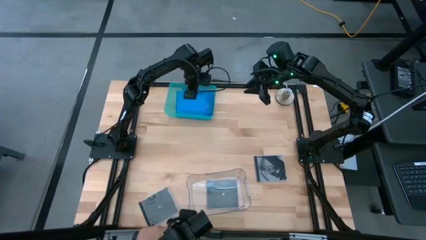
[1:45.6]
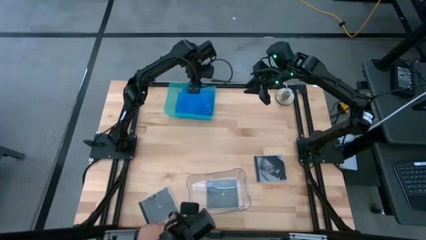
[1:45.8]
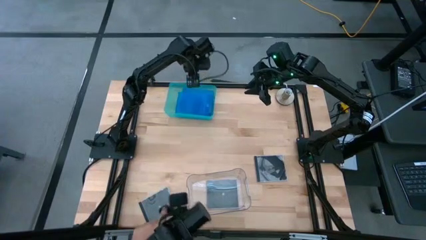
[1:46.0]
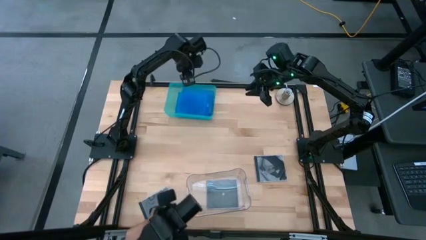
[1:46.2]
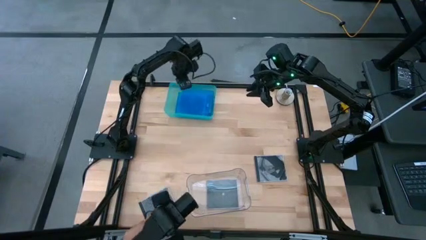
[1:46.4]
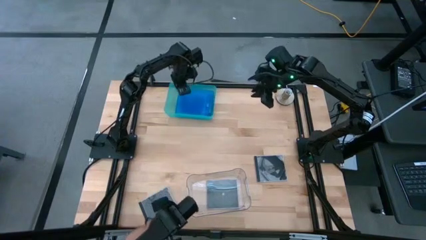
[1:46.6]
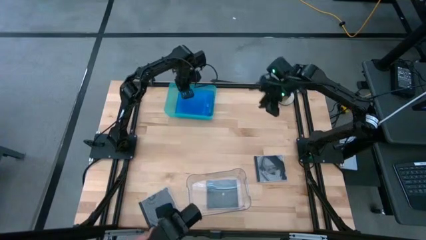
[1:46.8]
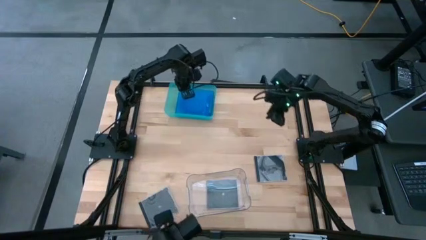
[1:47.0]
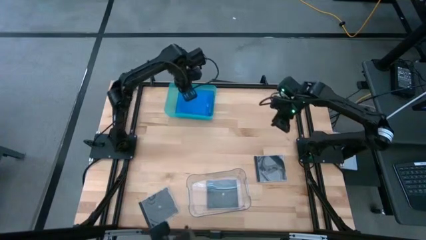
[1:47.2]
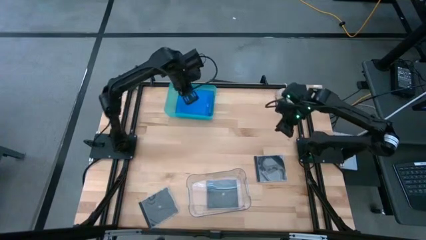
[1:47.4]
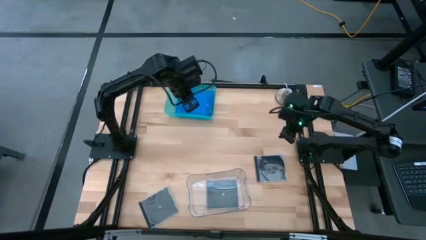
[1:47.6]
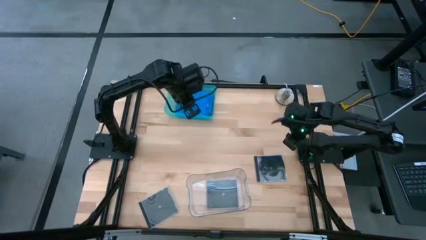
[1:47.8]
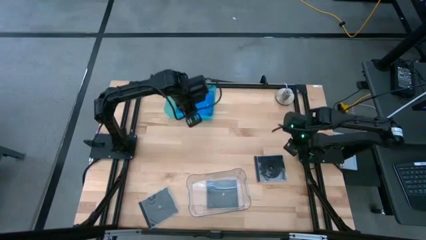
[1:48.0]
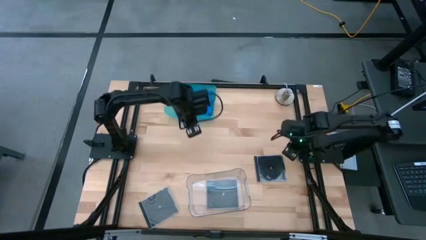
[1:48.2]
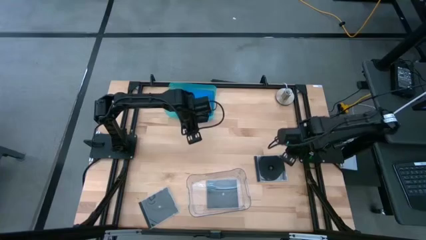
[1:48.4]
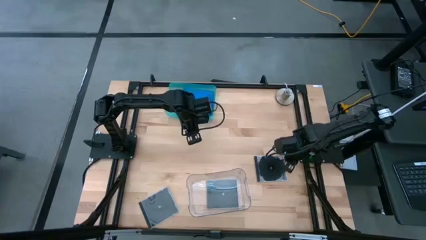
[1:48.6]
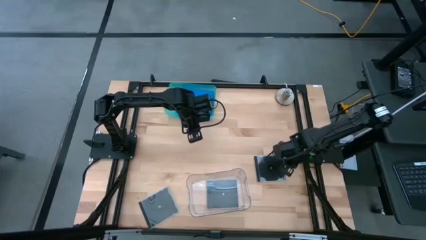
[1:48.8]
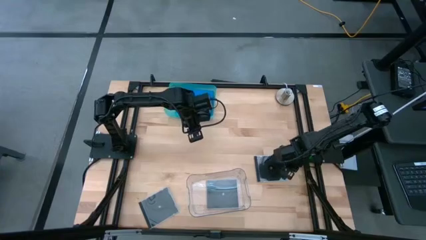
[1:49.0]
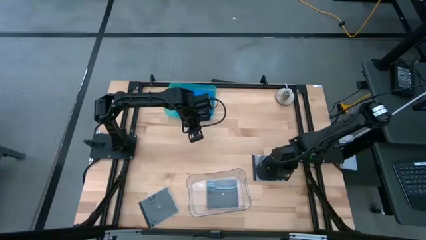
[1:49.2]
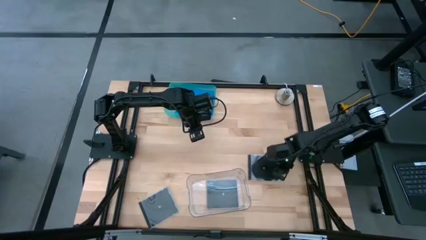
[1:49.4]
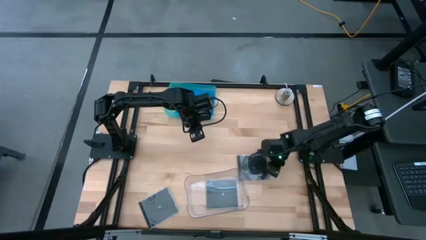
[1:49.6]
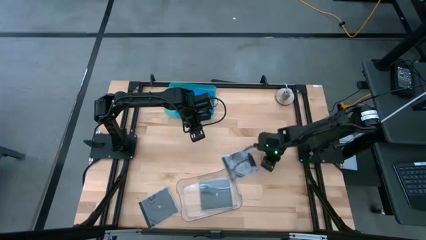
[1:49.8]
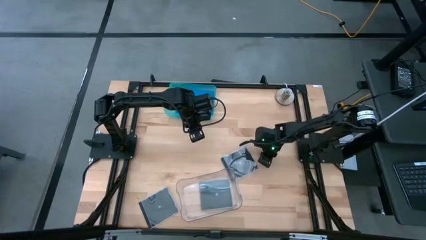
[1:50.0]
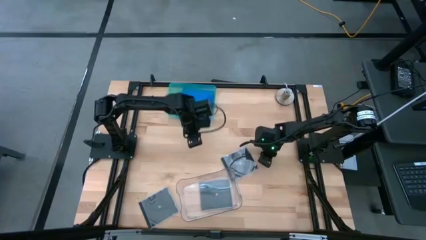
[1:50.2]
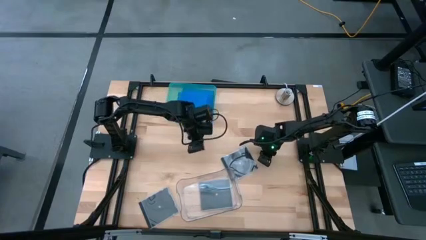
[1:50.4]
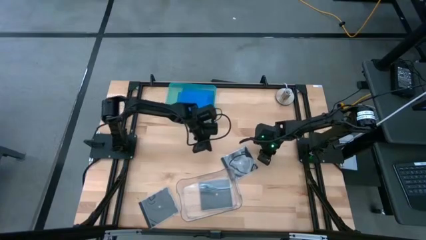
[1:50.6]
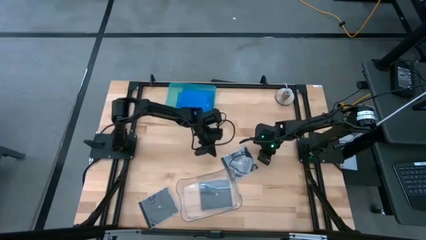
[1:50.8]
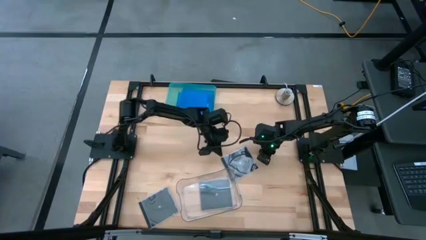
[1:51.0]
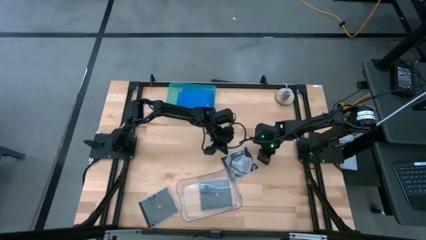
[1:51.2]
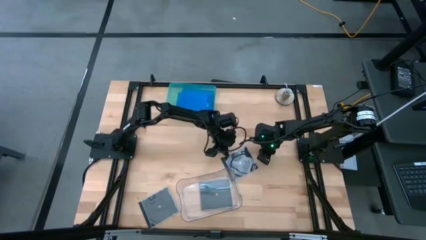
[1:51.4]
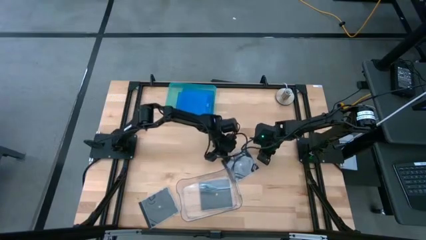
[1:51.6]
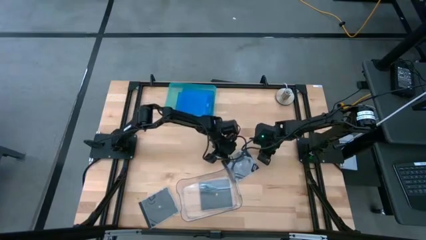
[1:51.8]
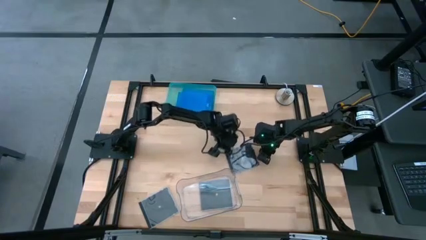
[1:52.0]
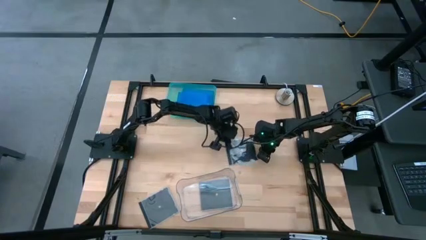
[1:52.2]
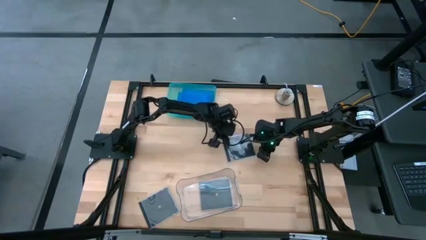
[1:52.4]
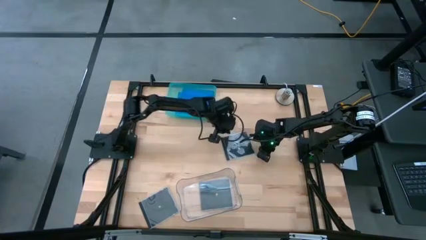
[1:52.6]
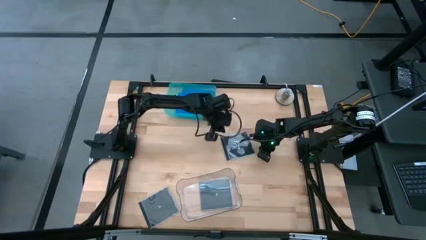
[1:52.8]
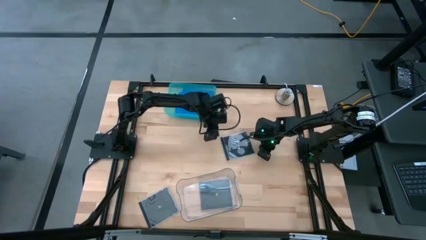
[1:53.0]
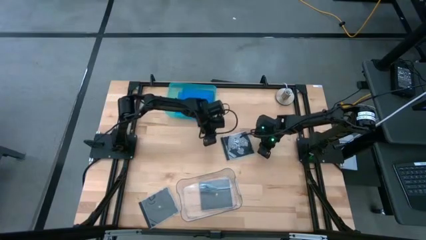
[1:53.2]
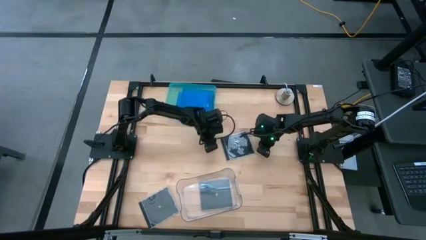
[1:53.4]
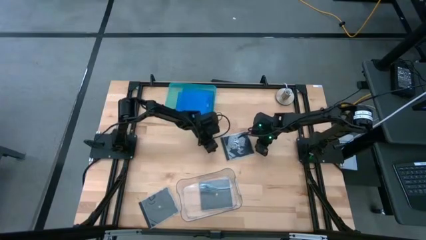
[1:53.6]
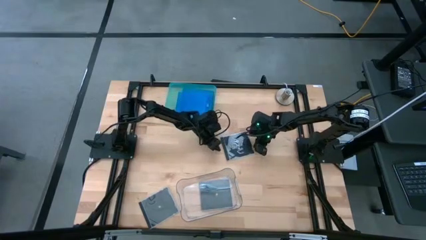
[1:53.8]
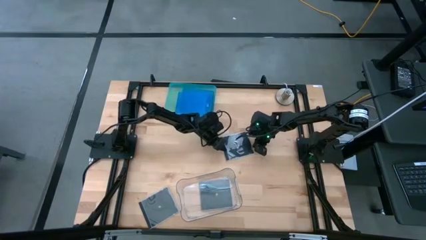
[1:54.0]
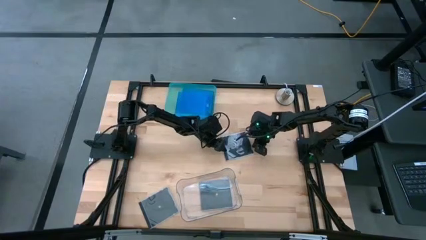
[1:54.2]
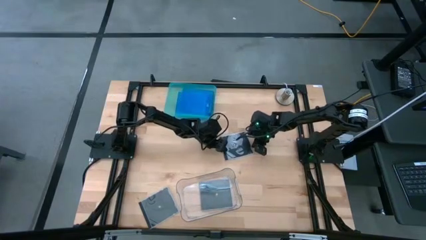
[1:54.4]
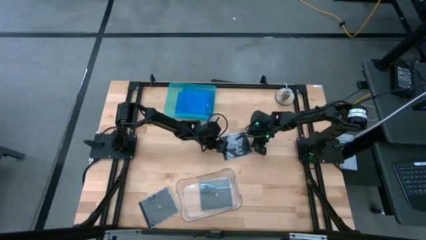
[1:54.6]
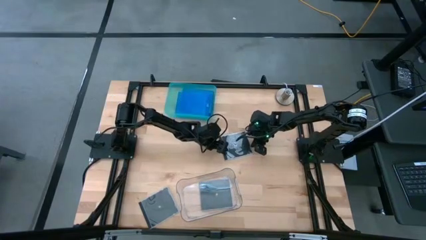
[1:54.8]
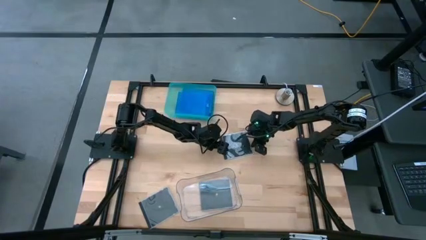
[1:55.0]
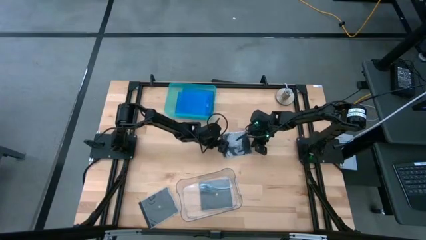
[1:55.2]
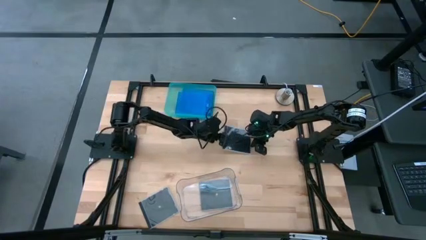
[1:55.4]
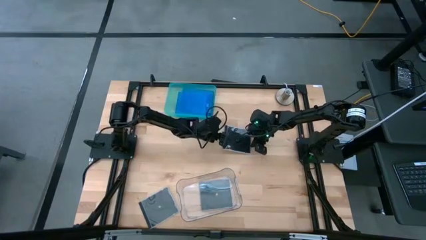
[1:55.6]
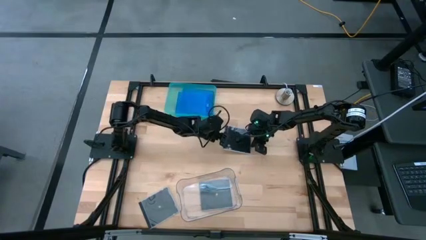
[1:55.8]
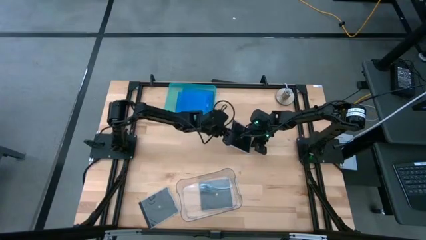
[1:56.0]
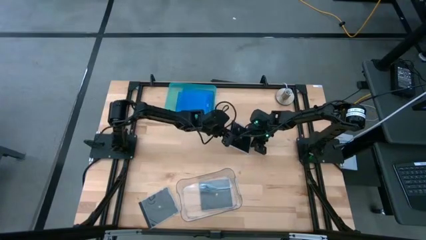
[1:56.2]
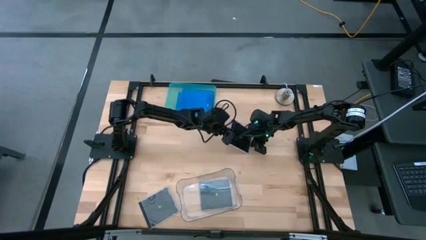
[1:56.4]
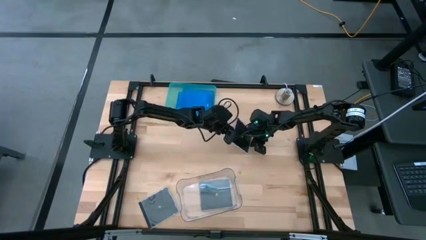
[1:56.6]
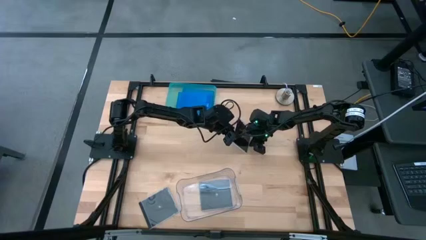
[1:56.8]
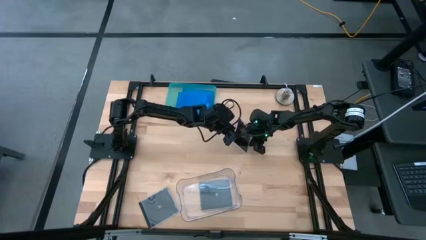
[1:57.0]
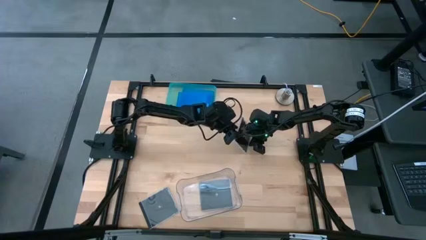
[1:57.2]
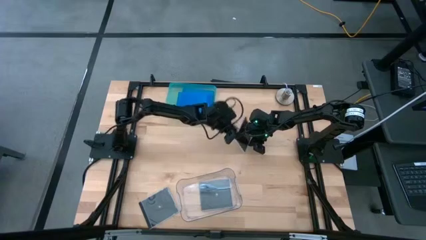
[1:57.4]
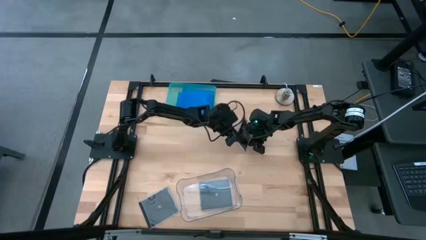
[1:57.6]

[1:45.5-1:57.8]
Task: Pick & place jewel cases by type
Put the top black CD case into the transparent bin
